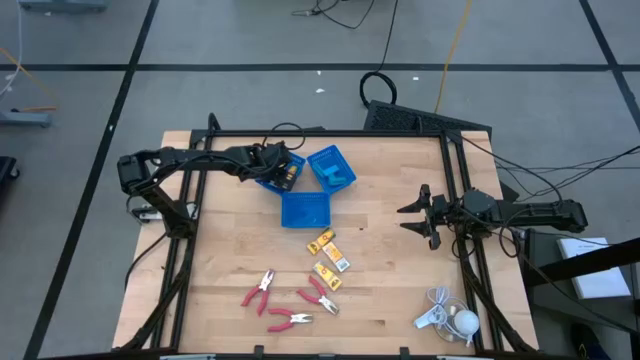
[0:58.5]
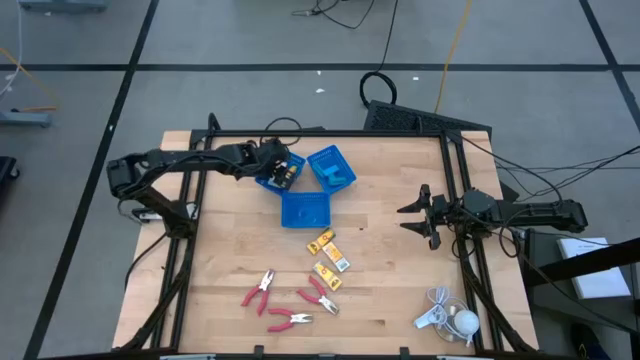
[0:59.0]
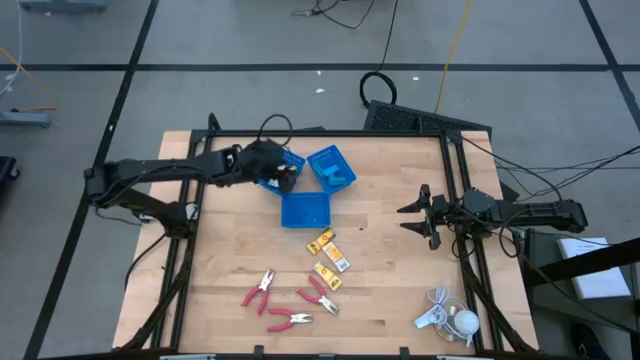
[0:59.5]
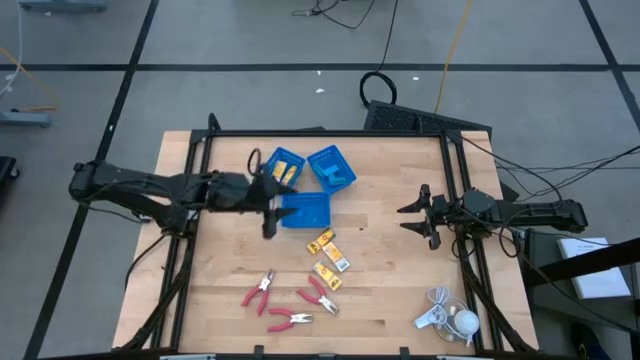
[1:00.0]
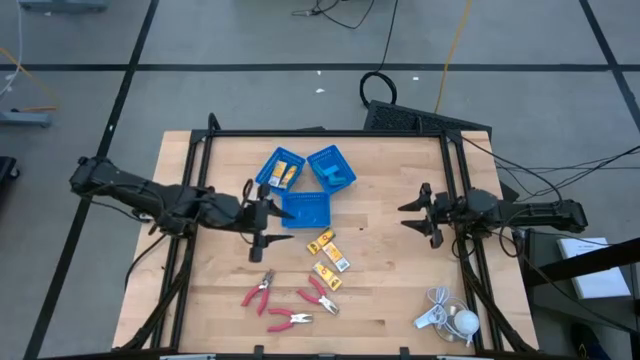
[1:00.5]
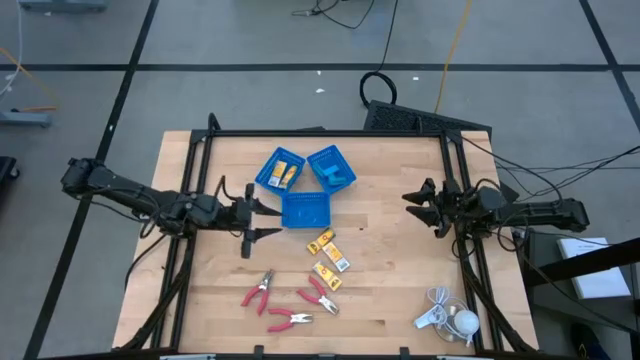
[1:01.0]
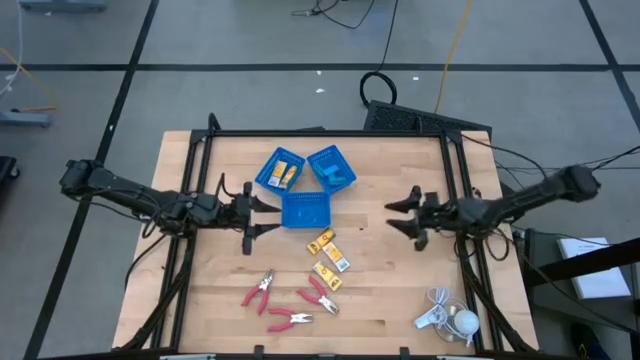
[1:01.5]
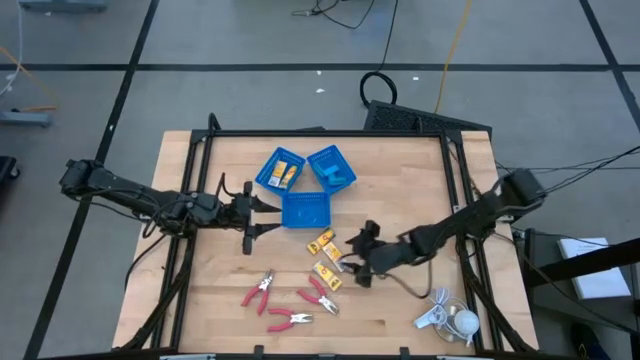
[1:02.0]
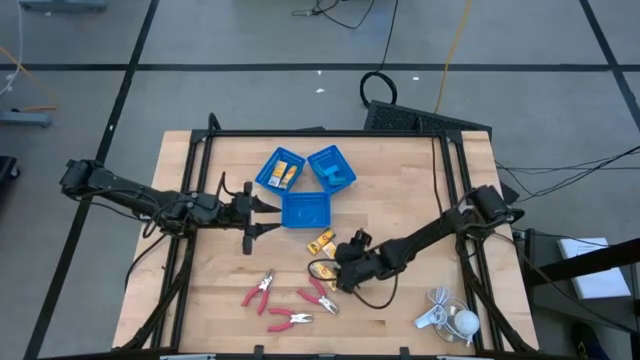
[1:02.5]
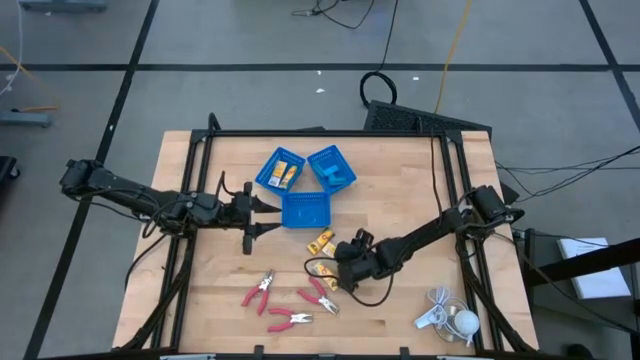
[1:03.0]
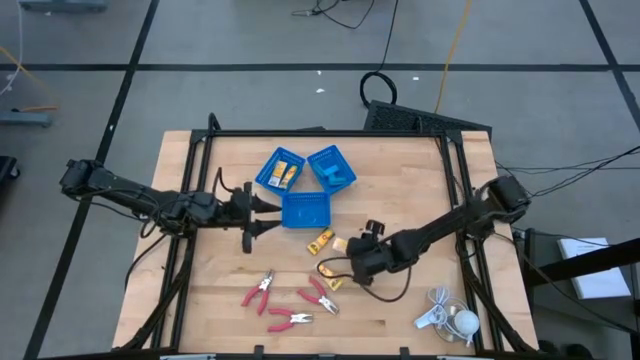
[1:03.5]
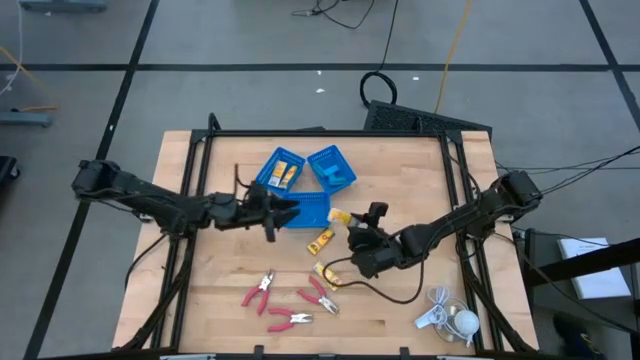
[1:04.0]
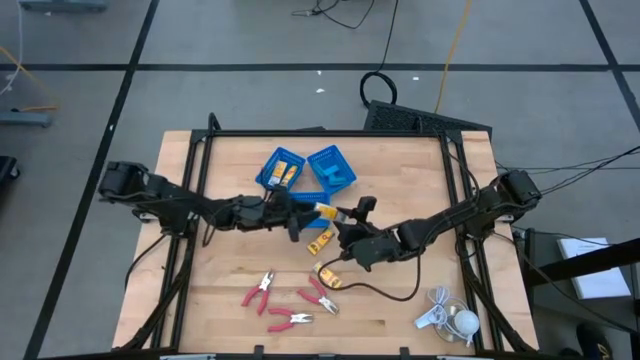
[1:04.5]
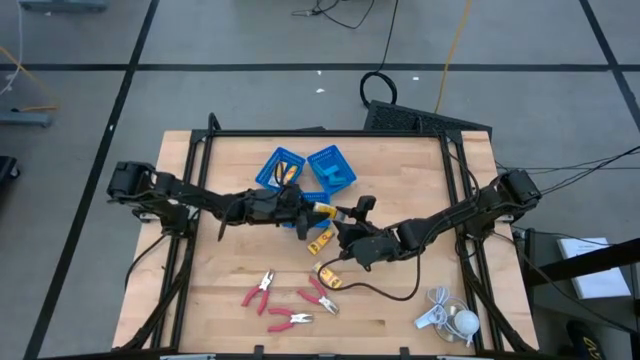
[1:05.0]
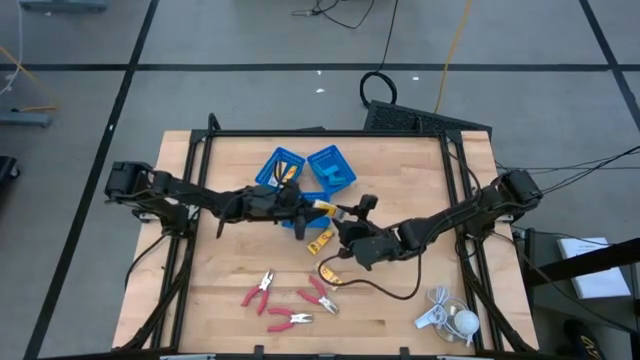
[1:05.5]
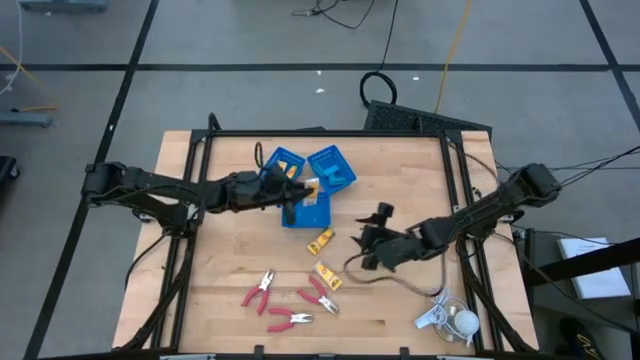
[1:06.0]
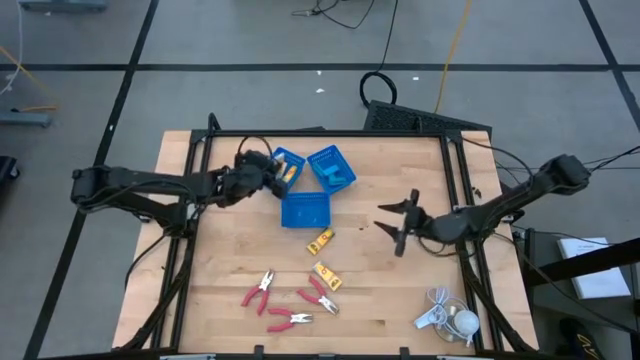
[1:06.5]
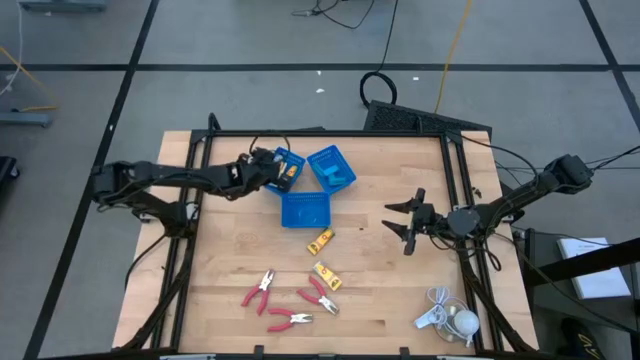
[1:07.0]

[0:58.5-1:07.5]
Task: Pick & Place School Supplies
Put the yellow crayon box into the top left blue bin

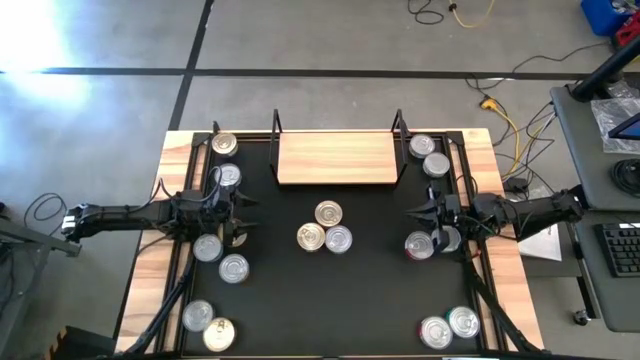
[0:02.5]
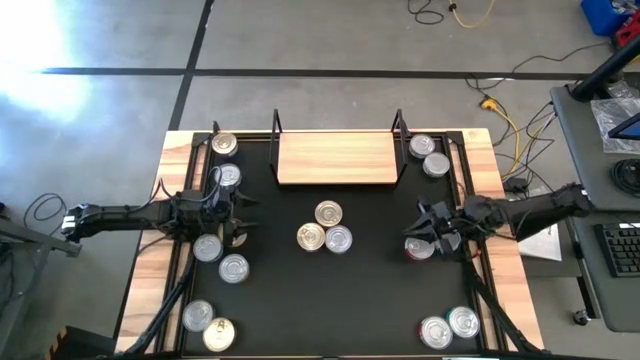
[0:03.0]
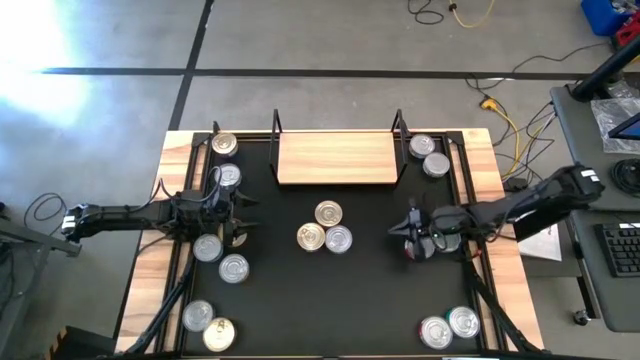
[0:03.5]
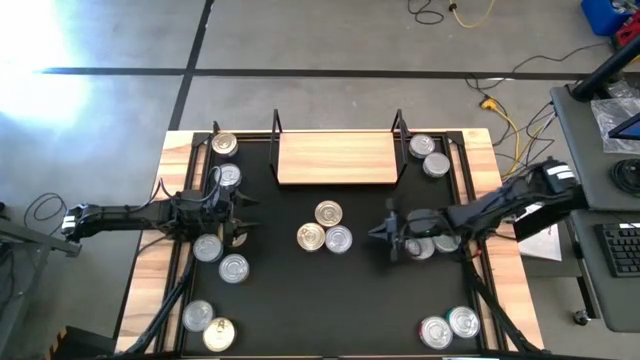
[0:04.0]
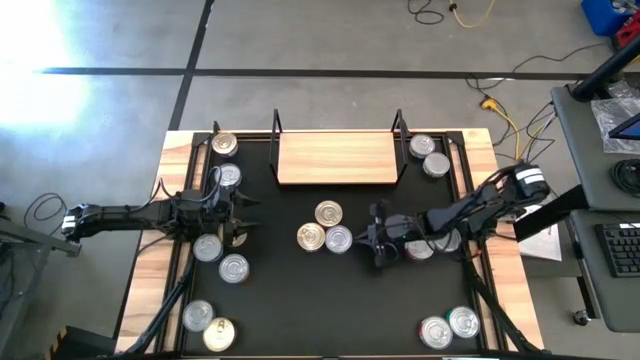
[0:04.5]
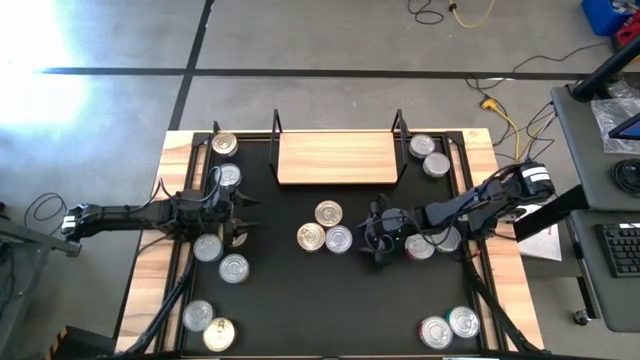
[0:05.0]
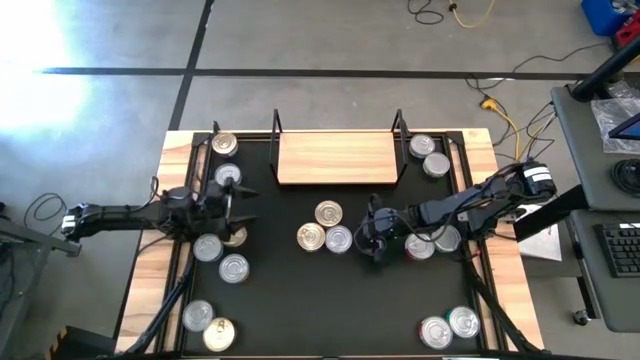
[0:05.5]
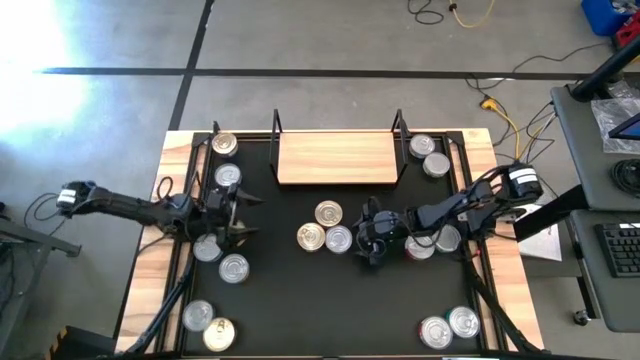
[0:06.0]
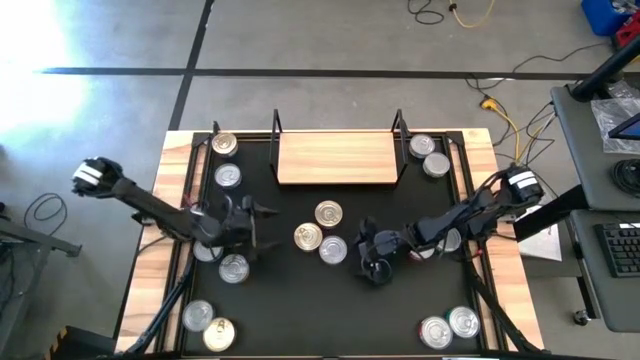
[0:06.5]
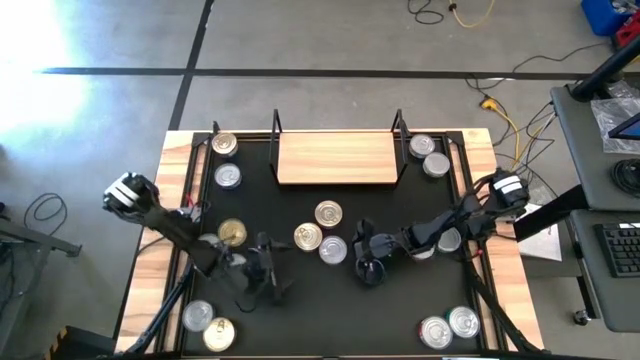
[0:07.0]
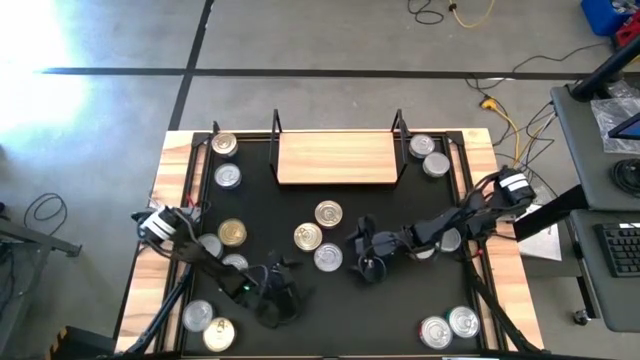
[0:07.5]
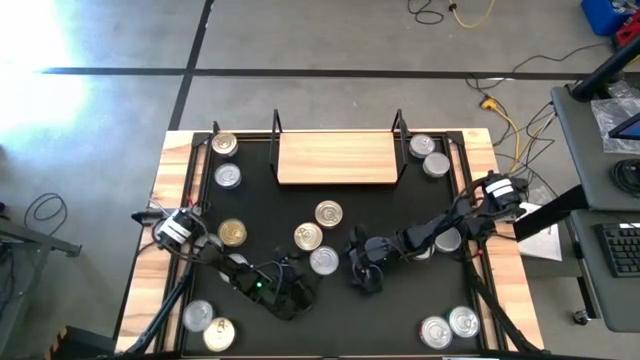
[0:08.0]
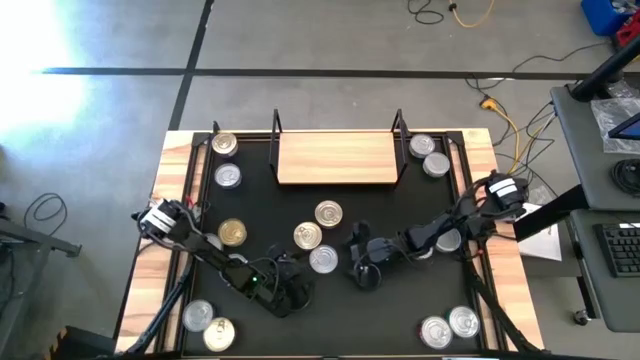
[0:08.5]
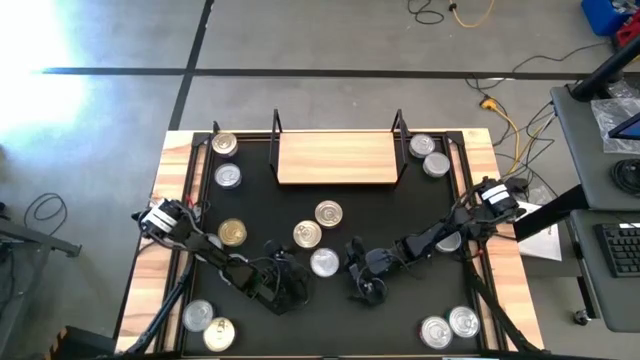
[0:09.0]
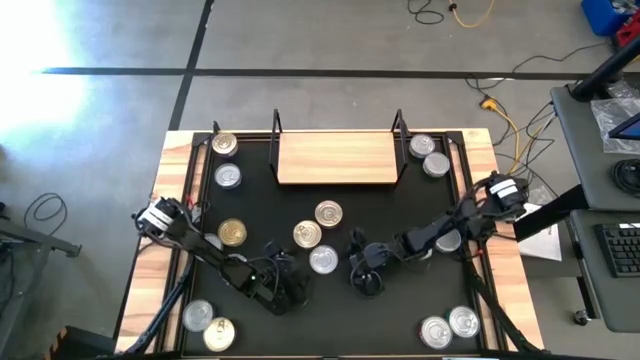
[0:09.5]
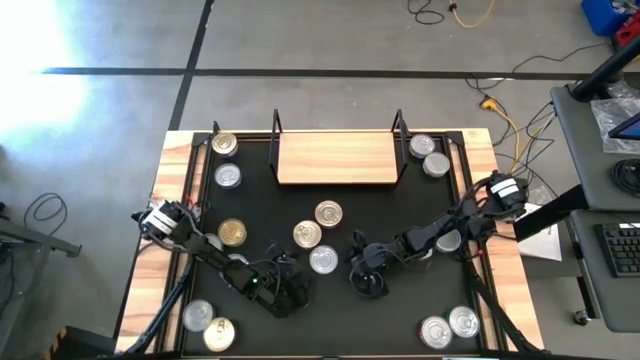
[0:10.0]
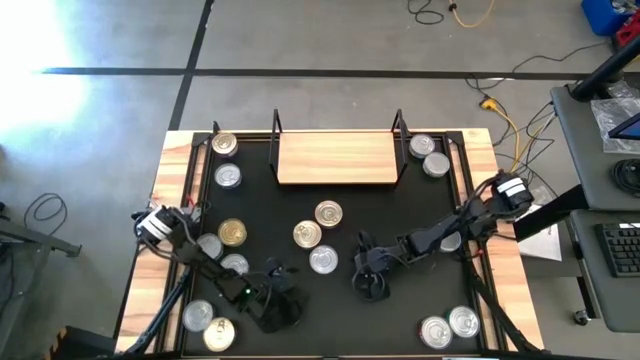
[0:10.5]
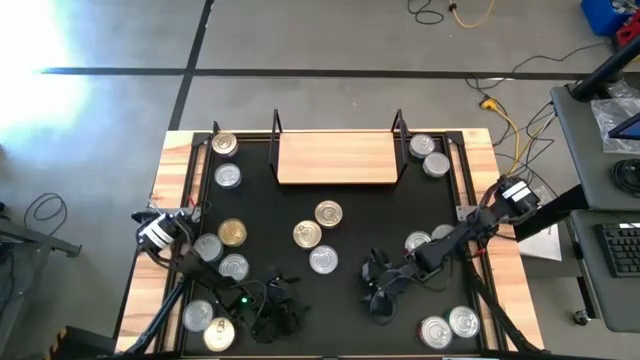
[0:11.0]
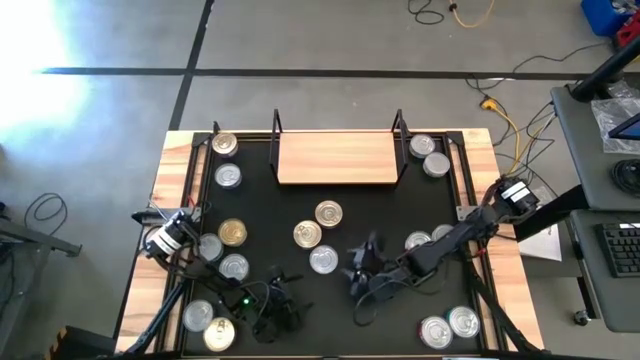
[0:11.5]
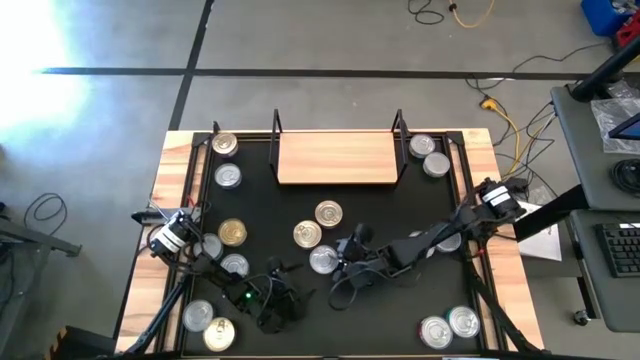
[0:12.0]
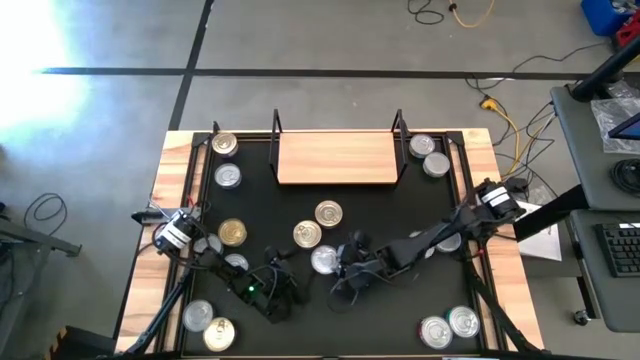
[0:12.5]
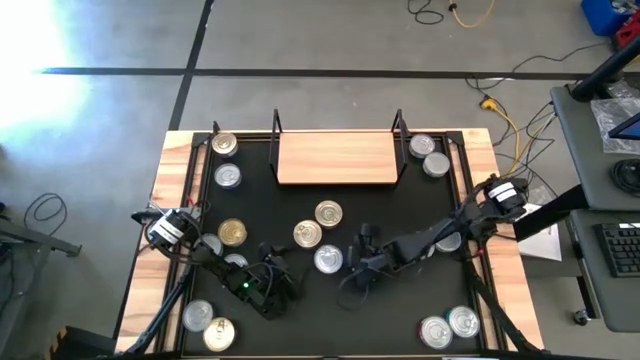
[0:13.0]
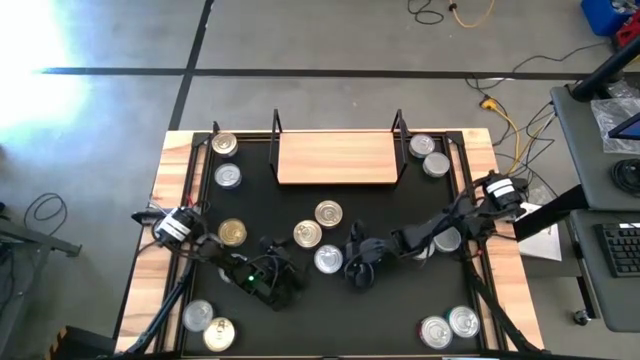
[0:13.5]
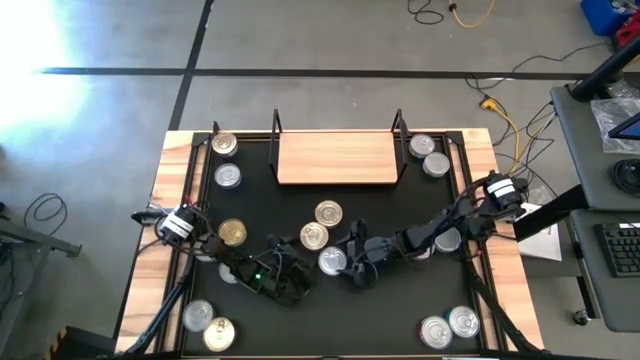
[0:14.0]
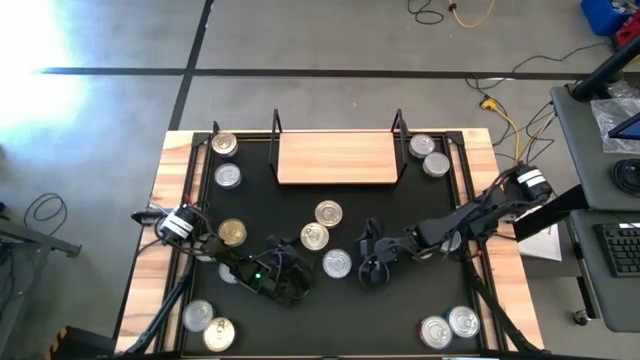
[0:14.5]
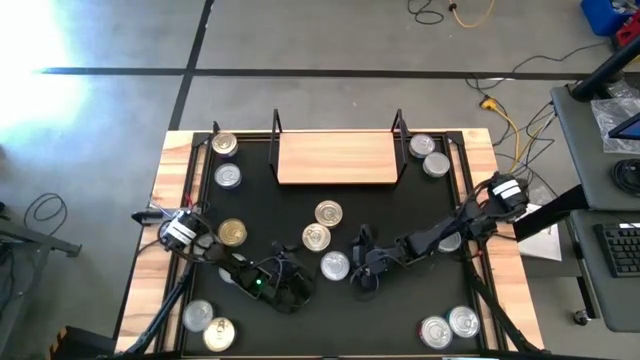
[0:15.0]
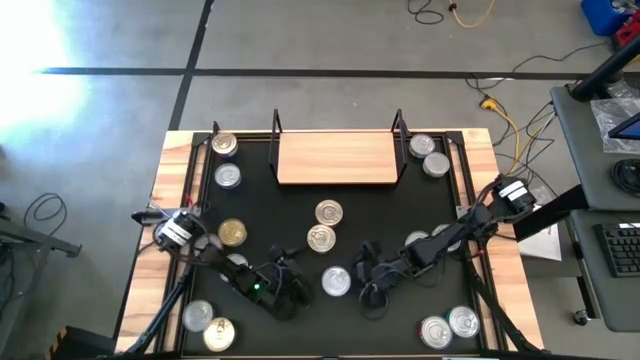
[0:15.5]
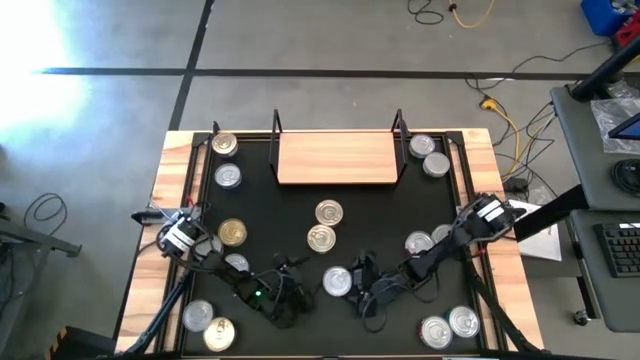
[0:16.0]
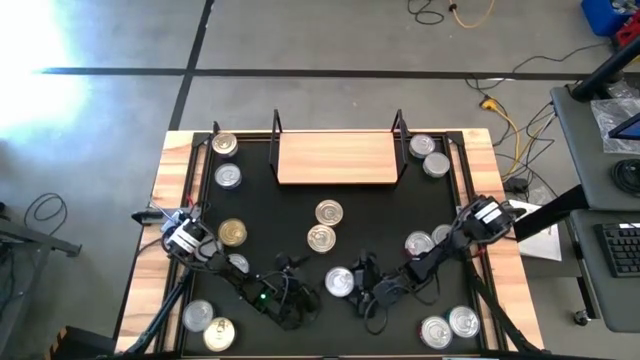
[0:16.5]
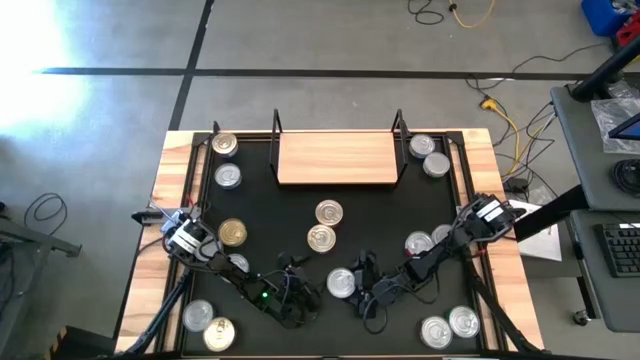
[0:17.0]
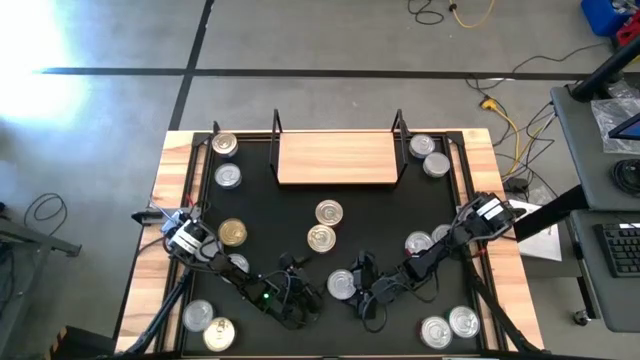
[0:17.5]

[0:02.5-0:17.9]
Task: Stack canned seafood by type on shelf
Put the green tuna can on the shelf
